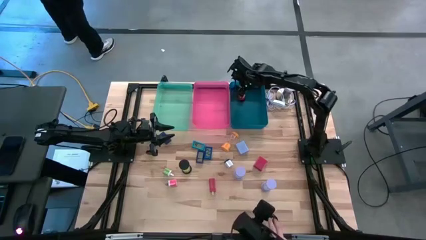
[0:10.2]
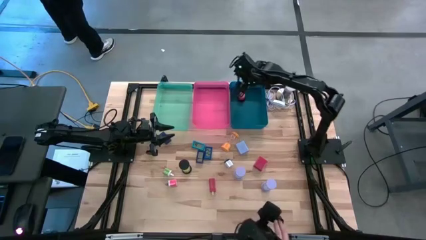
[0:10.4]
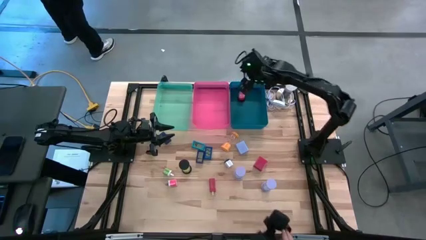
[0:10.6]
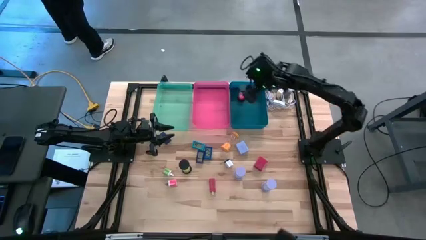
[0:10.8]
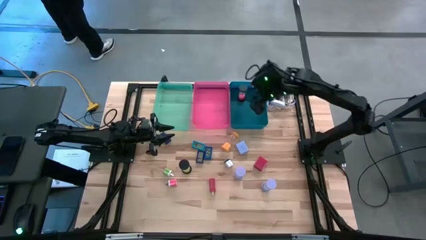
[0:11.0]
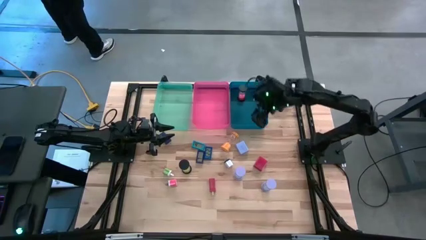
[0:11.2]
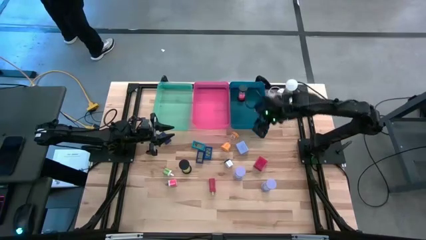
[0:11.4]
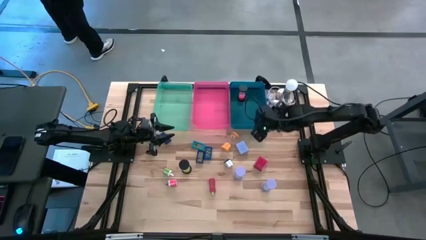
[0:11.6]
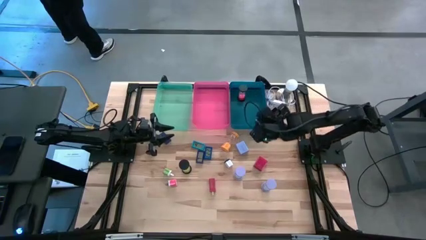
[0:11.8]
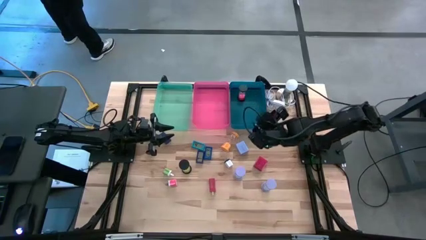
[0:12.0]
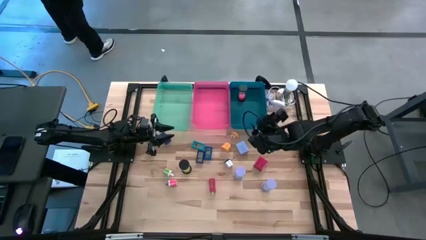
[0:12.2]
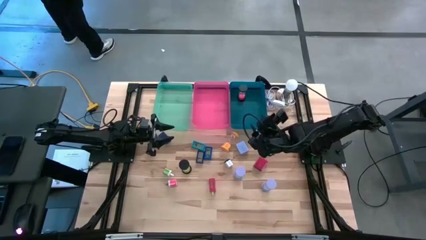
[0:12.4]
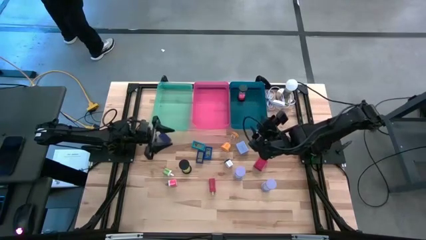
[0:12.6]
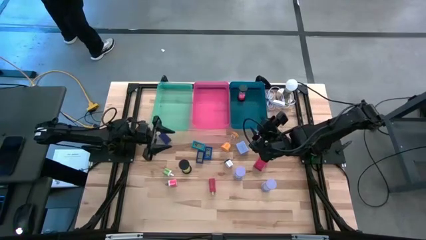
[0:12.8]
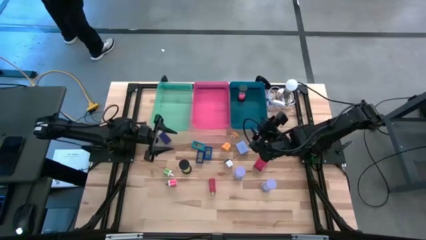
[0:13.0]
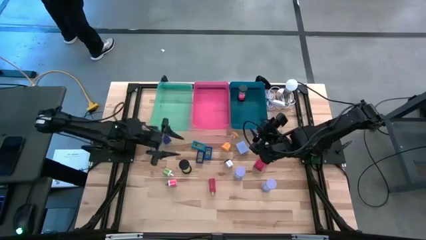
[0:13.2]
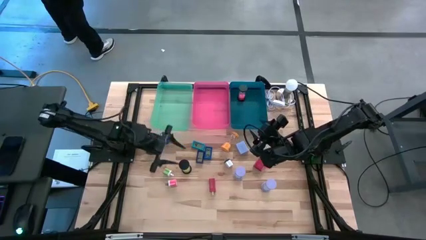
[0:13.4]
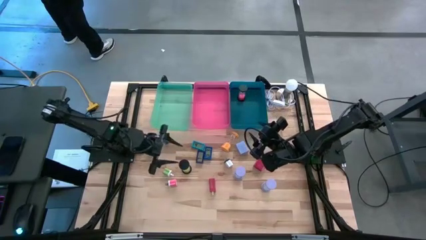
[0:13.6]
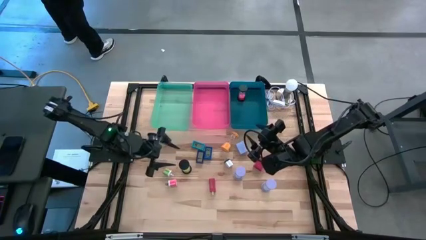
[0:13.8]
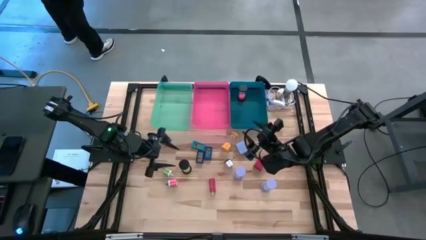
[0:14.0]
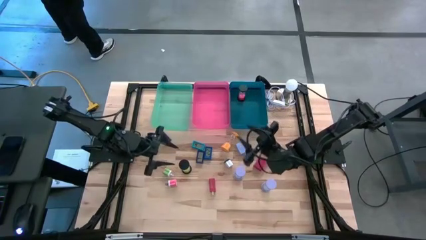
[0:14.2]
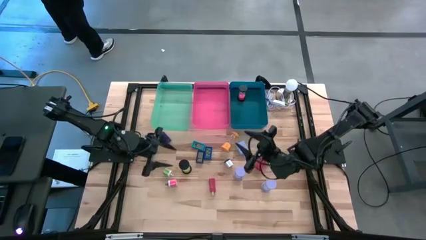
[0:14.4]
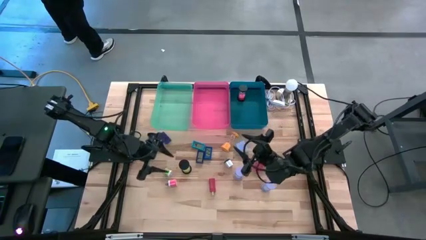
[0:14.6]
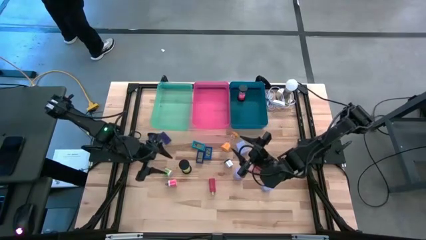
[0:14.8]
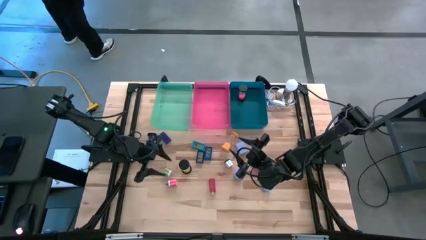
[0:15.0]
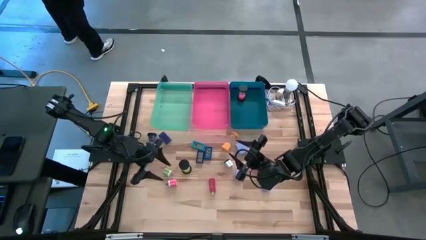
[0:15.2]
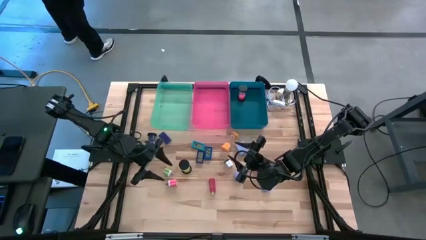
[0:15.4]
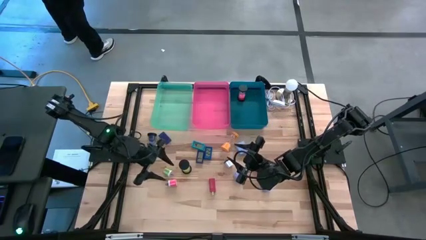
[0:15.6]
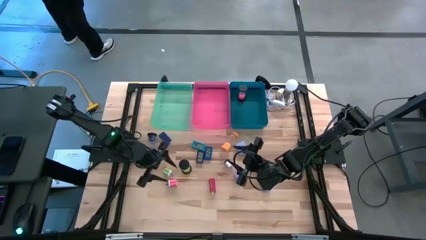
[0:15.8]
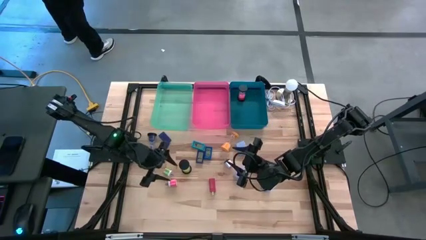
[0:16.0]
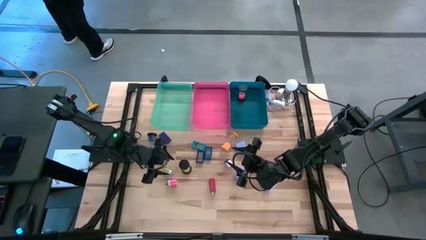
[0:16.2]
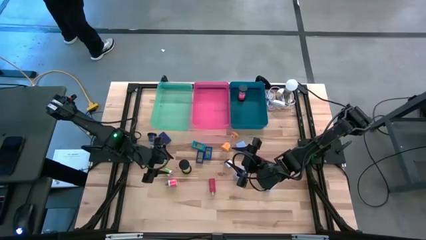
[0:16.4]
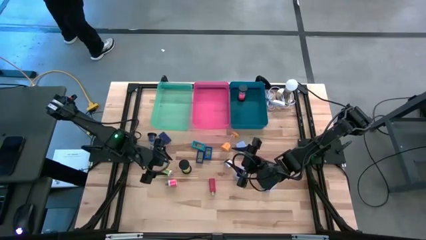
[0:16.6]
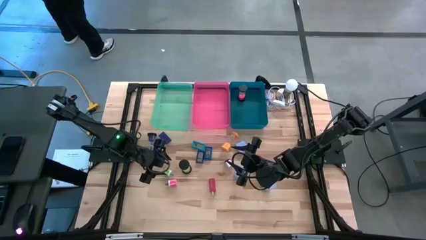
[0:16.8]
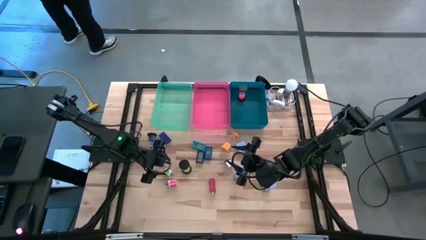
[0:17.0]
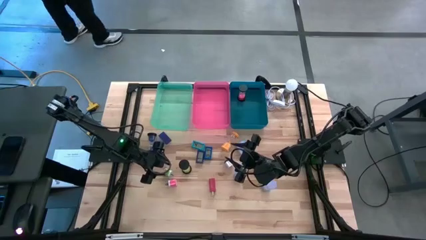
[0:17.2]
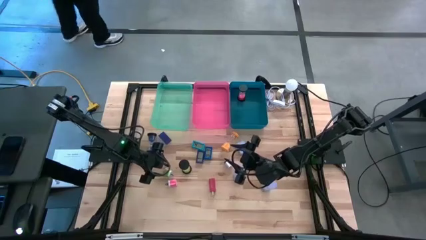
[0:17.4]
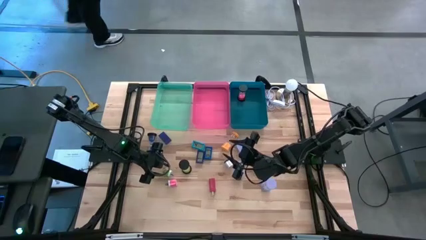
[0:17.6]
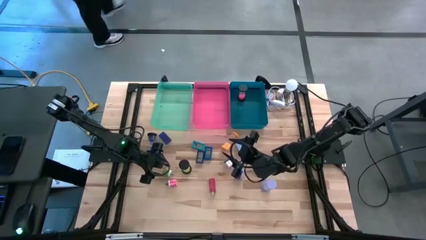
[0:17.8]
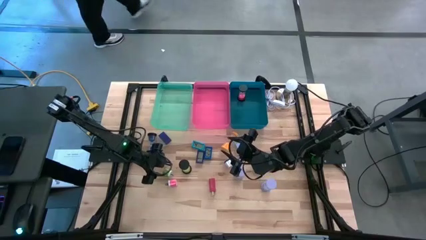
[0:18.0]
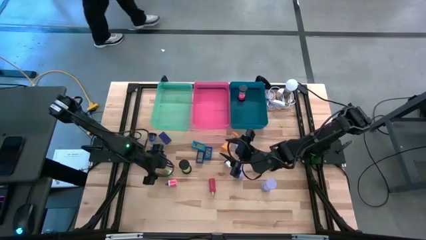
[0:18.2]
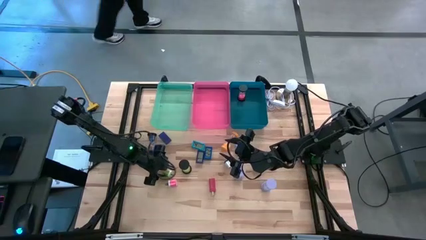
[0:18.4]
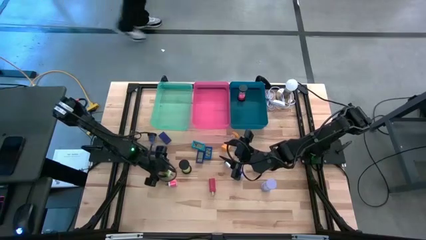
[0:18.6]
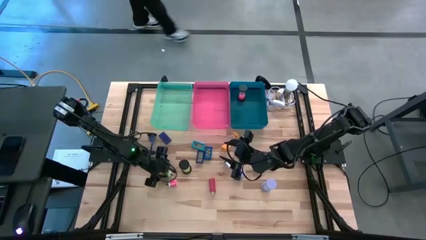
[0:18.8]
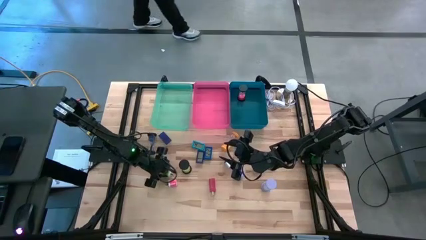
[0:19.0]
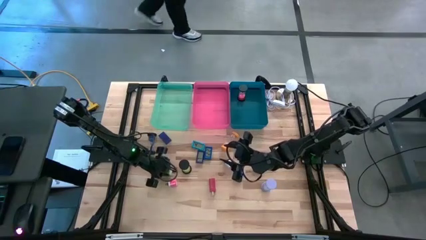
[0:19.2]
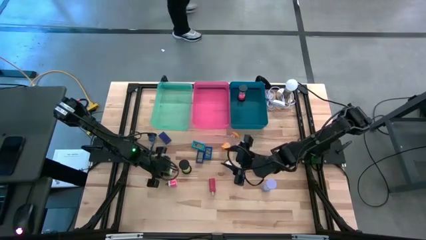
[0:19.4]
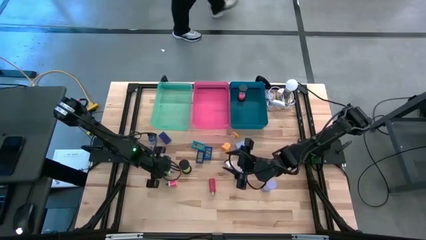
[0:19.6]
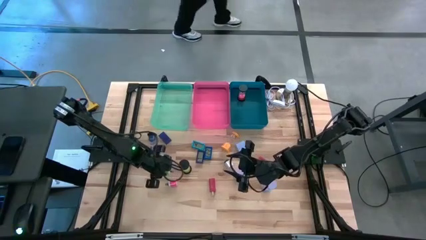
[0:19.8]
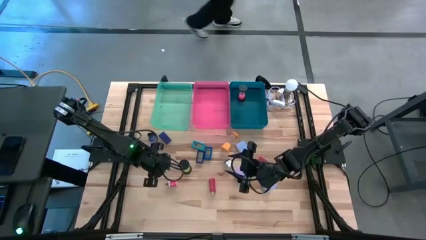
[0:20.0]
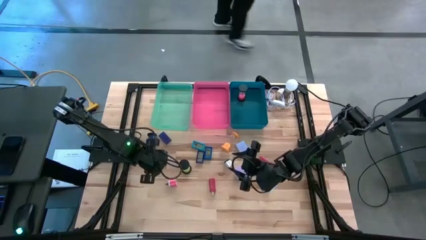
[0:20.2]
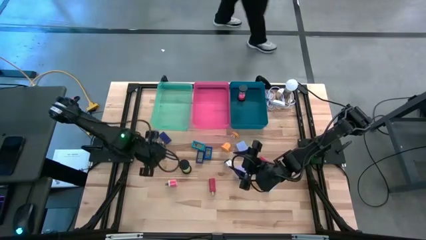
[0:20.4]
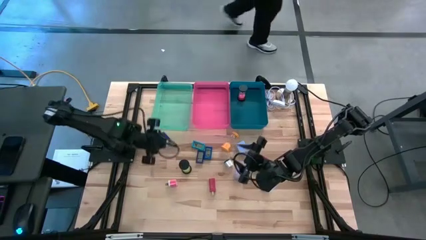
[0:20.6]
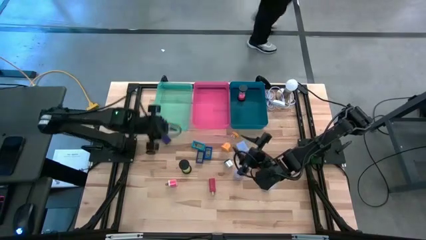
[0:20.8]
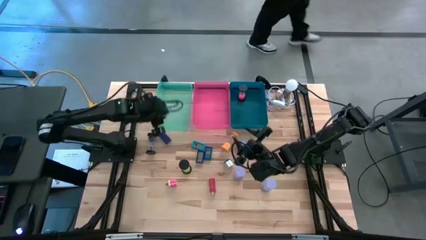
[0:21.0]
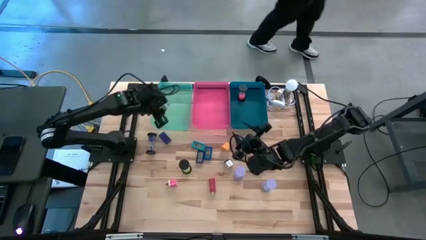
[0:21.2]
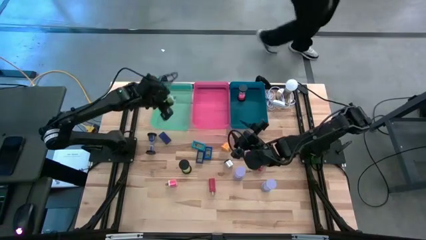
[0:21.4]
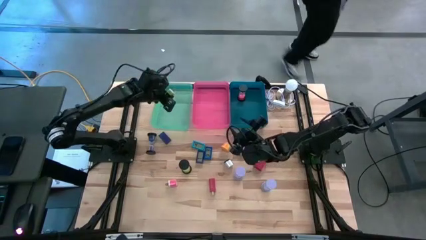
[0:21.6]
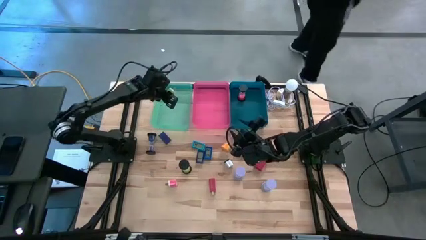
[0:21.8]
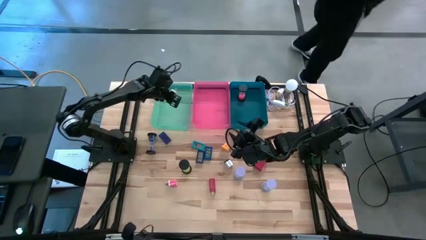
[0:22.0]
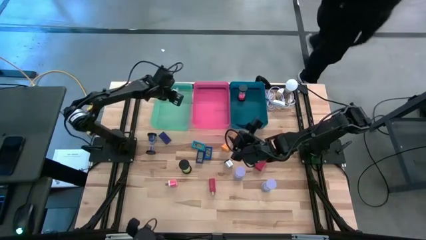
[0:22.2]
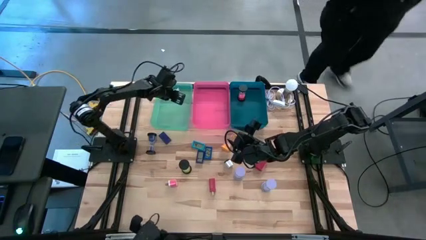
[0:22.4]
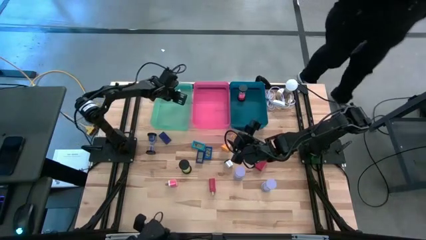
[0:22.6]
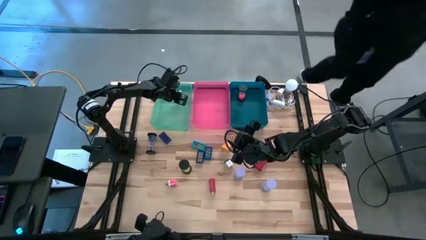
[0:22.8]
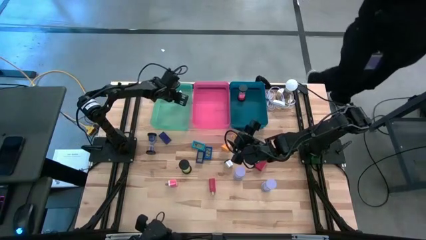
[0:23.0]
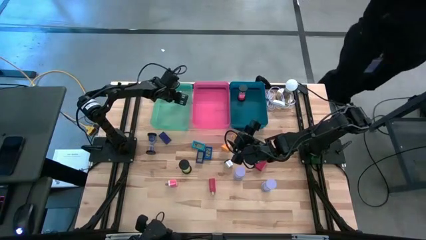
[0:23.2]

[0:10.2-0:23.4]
Task: Pick & Place Office items
Put the green white adapter into the green bin
